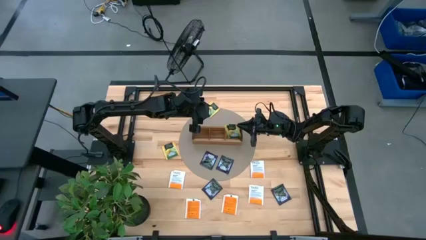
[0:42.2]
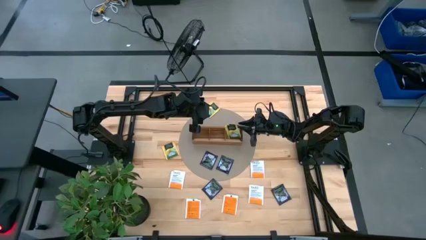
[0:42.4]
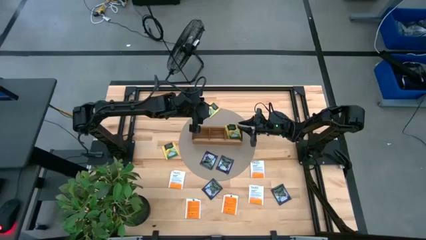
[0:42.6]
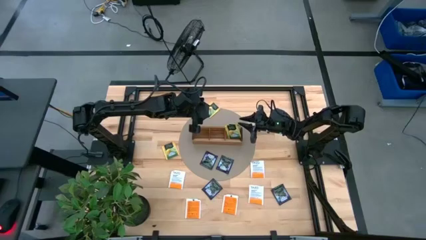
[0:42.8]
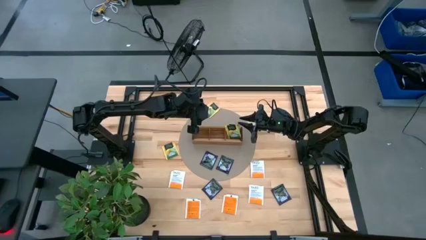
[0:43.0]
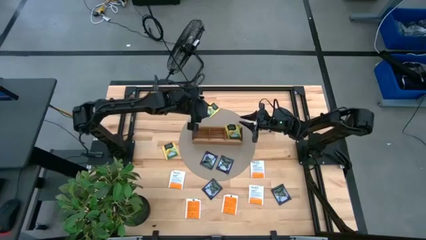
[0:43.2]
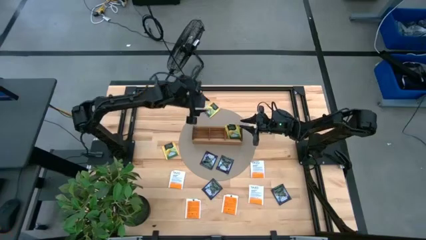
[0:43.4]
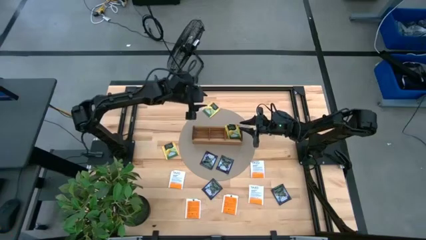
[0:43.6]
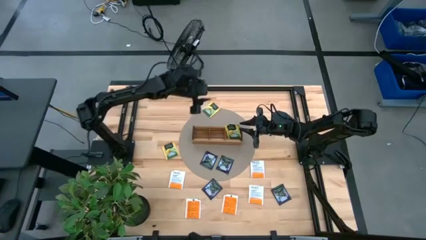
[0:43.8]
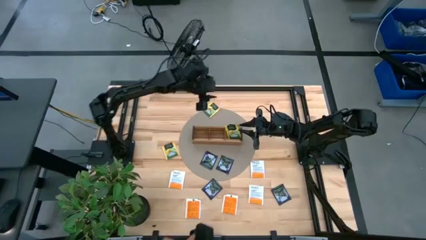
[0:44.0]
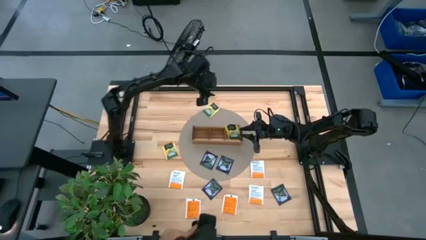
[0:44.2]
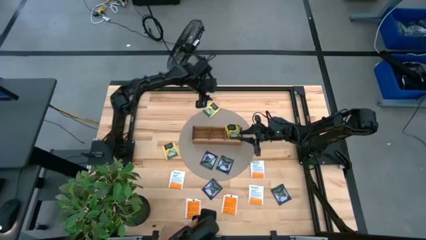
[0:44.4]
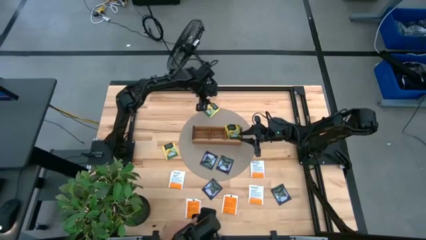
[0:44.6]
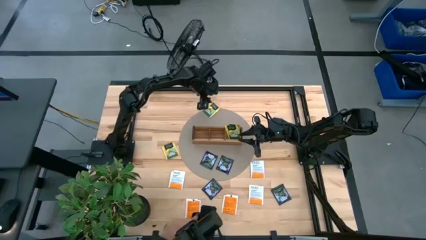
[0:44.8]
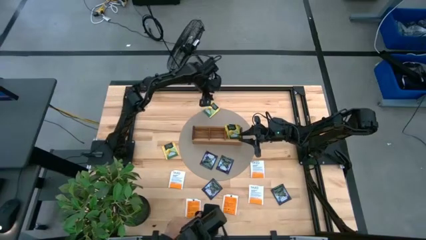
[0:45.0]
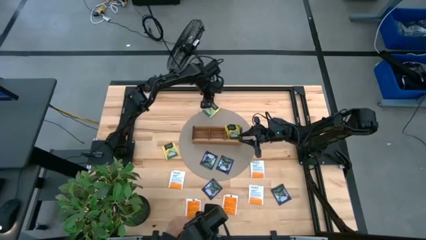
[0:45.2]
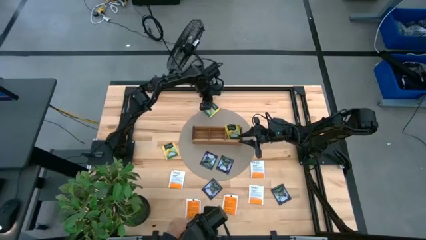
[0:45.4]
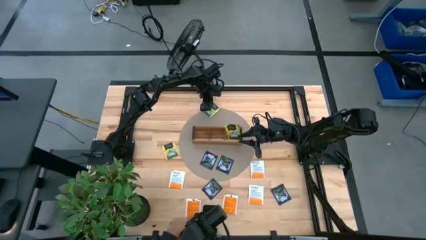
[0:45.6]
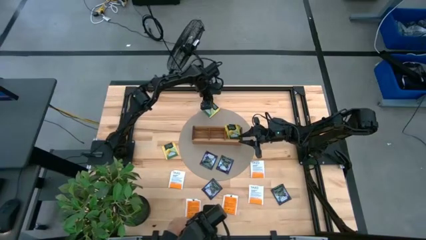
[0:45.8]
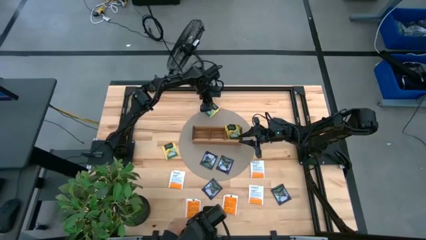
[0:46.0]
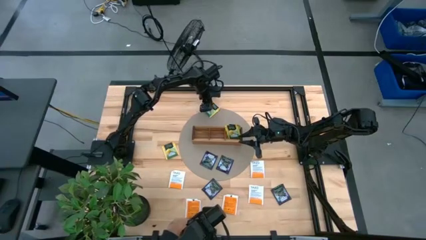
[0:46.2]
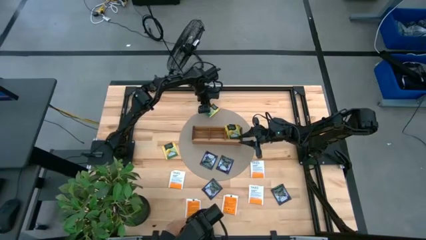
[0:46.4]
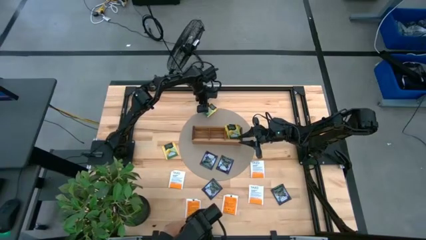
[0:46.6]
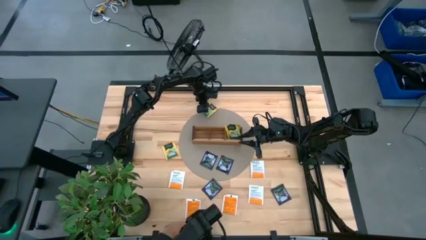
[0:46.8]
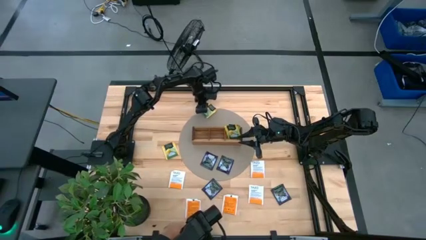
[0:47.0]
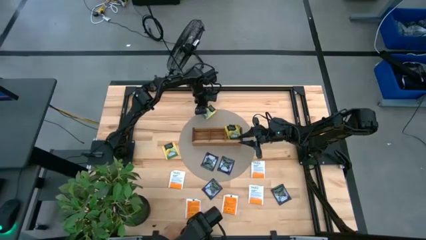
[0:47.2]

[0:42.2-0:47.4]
Task: Pick & Place Tea
Put the yellow tea bag into the right section of the wooden organizer

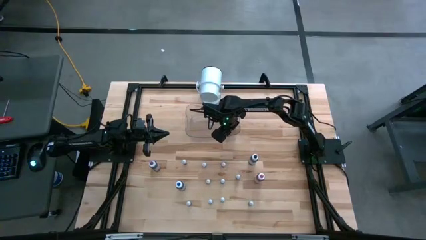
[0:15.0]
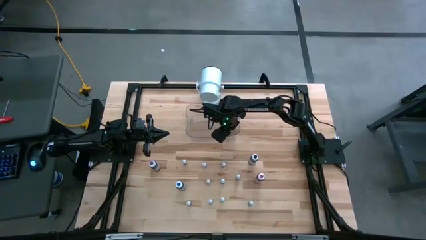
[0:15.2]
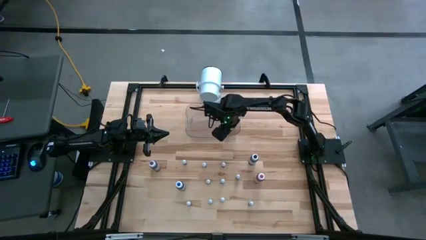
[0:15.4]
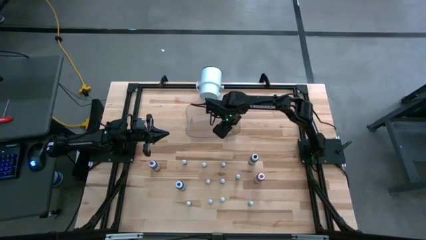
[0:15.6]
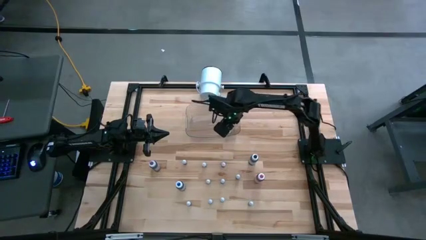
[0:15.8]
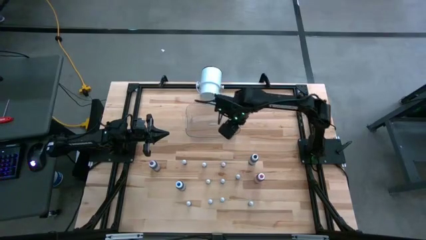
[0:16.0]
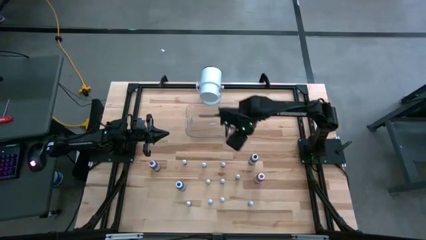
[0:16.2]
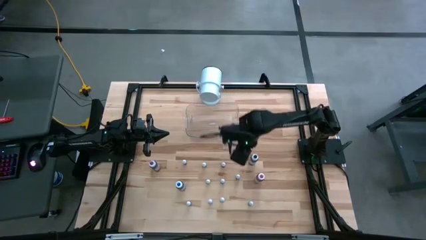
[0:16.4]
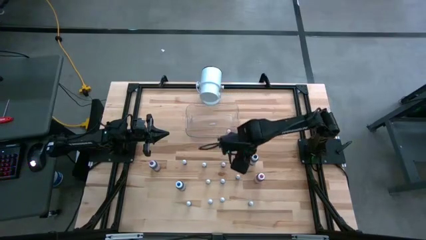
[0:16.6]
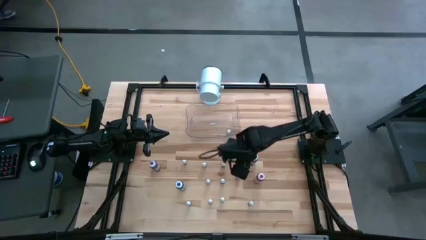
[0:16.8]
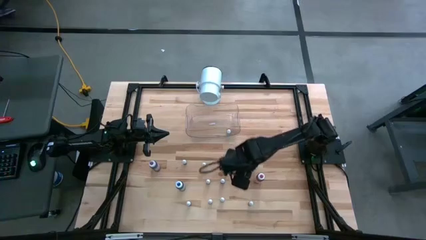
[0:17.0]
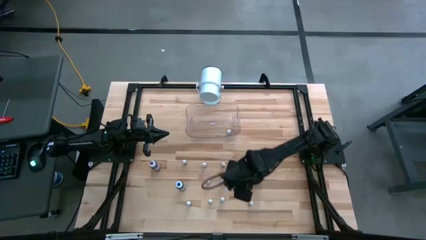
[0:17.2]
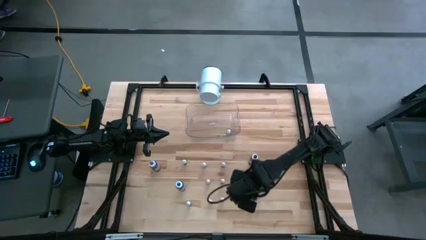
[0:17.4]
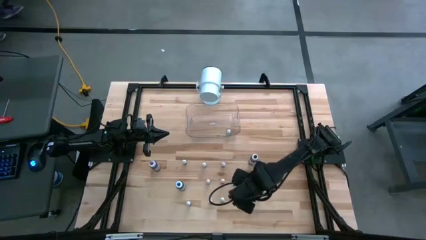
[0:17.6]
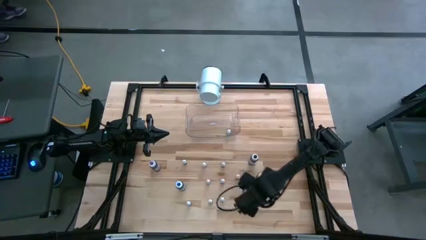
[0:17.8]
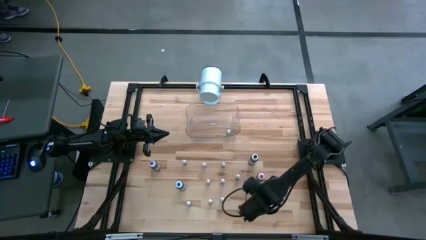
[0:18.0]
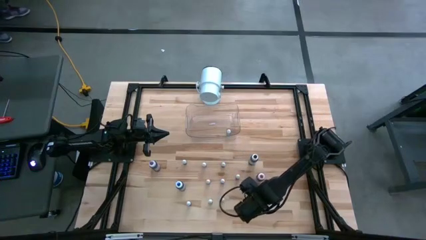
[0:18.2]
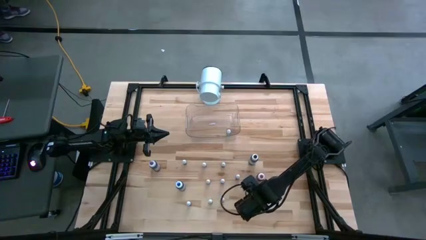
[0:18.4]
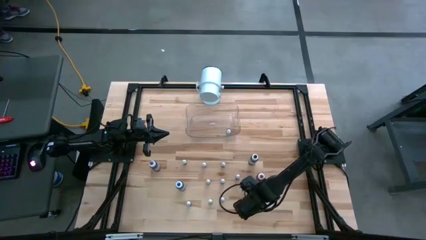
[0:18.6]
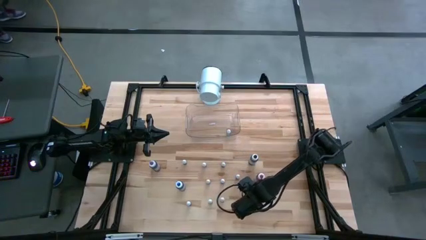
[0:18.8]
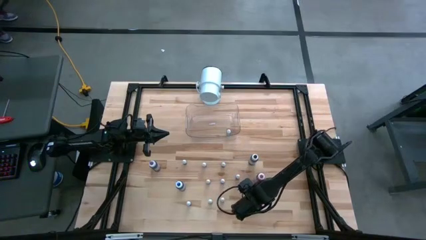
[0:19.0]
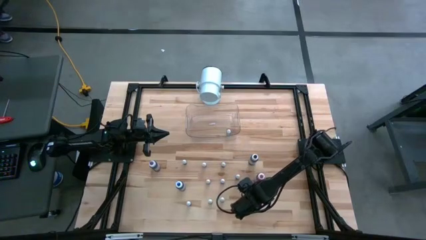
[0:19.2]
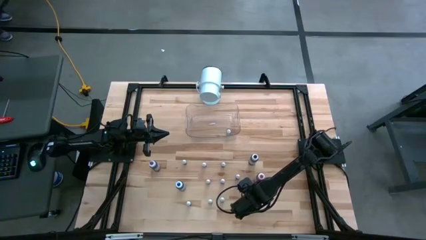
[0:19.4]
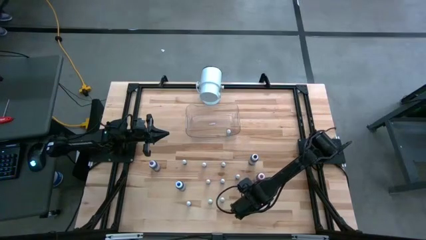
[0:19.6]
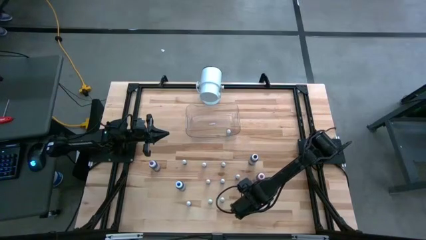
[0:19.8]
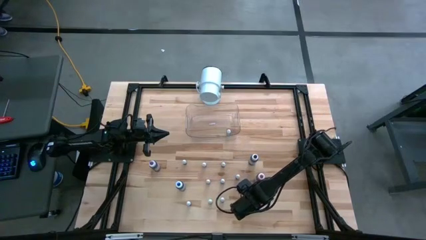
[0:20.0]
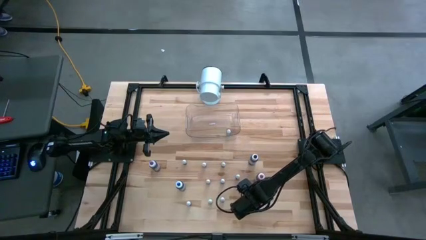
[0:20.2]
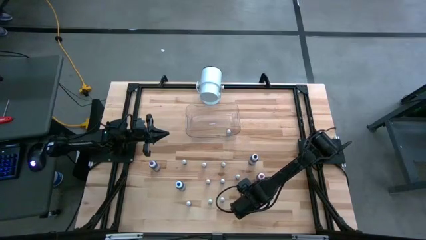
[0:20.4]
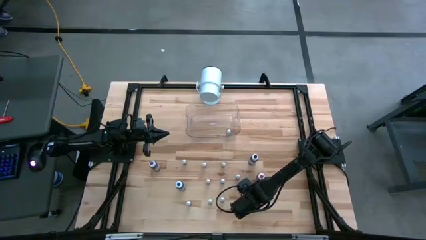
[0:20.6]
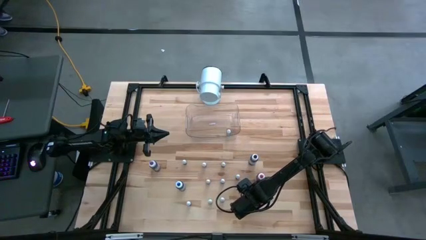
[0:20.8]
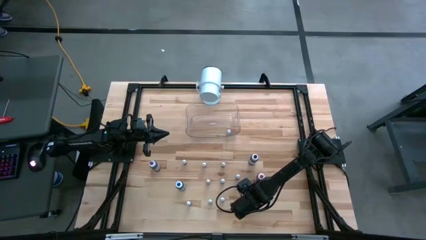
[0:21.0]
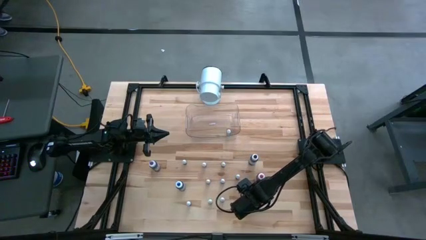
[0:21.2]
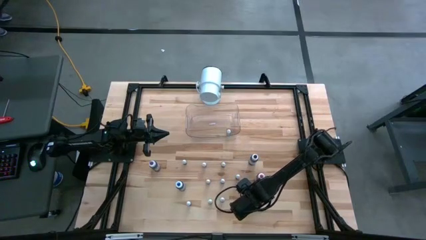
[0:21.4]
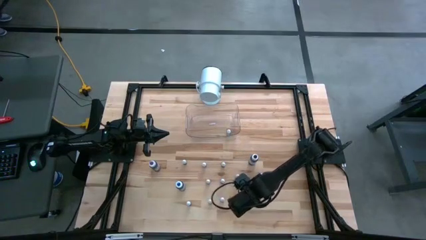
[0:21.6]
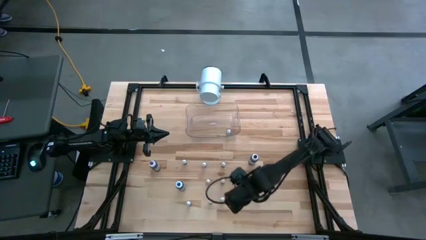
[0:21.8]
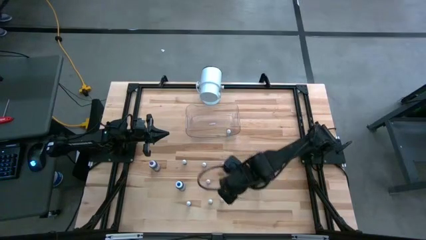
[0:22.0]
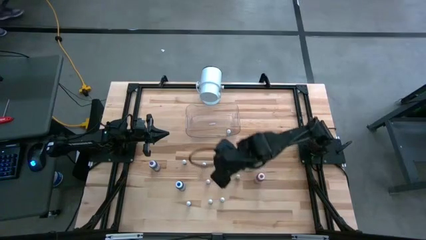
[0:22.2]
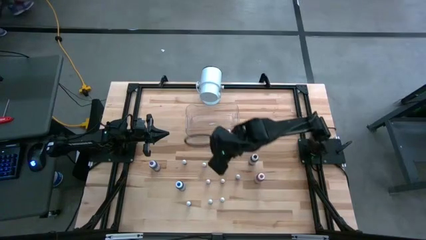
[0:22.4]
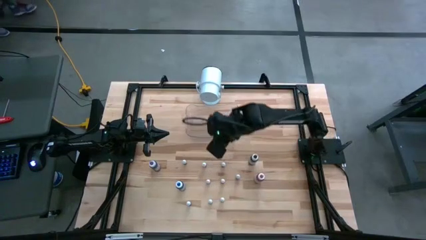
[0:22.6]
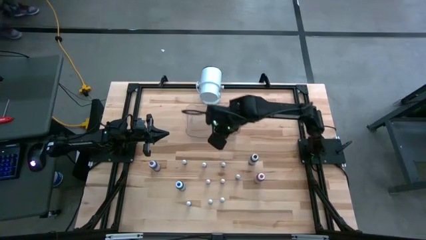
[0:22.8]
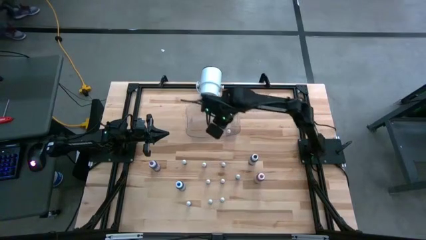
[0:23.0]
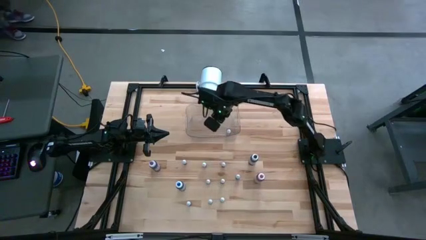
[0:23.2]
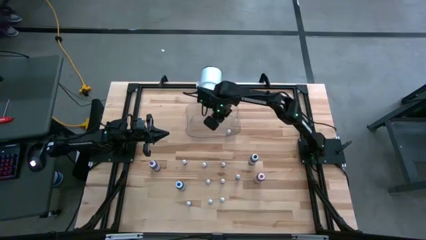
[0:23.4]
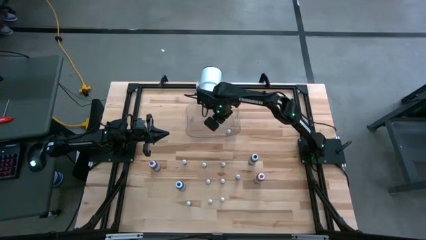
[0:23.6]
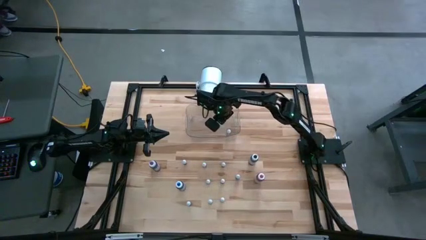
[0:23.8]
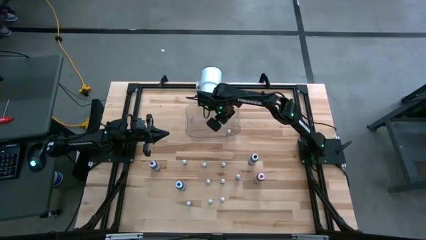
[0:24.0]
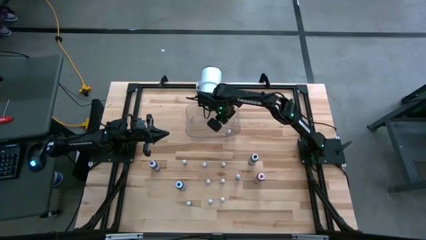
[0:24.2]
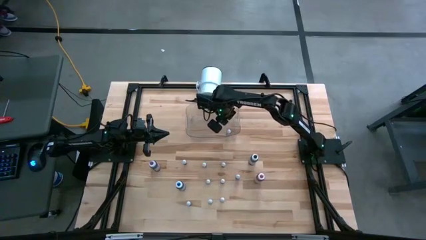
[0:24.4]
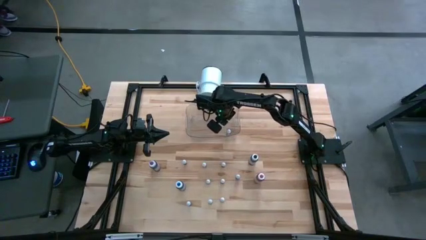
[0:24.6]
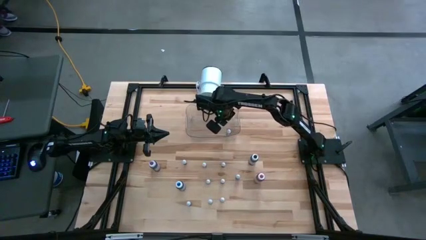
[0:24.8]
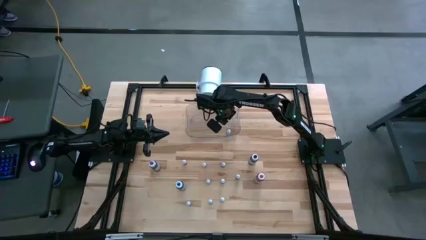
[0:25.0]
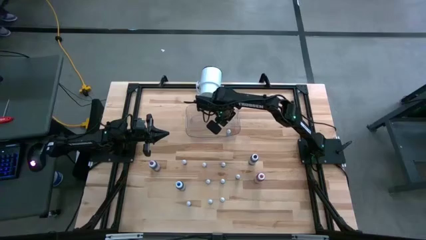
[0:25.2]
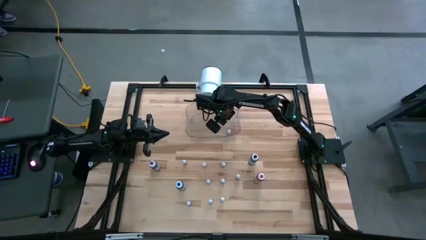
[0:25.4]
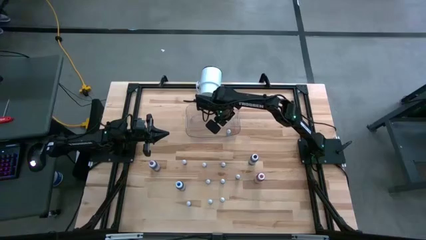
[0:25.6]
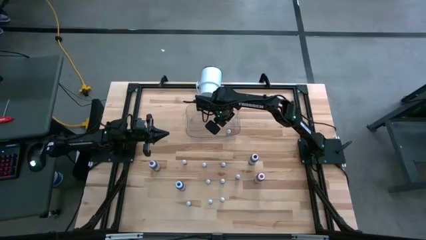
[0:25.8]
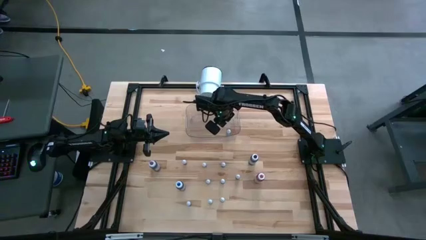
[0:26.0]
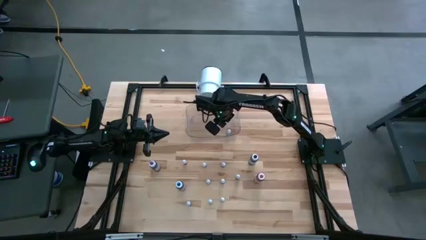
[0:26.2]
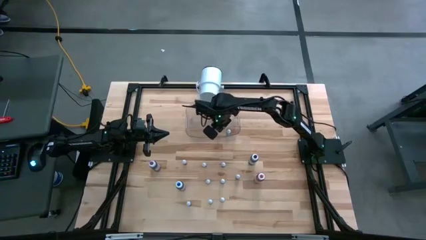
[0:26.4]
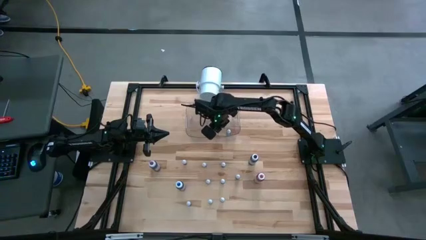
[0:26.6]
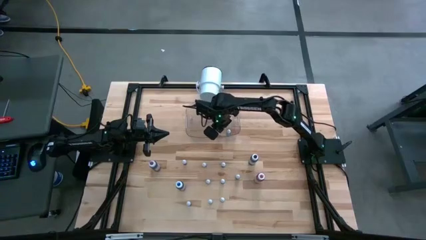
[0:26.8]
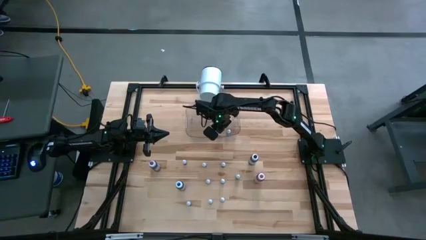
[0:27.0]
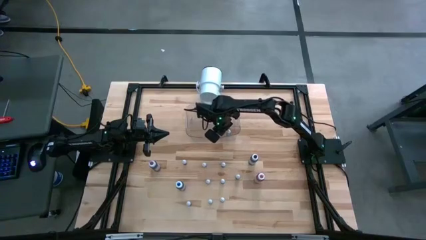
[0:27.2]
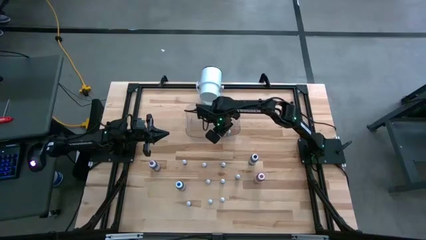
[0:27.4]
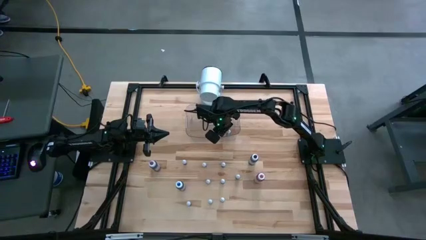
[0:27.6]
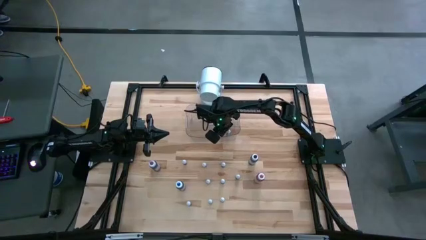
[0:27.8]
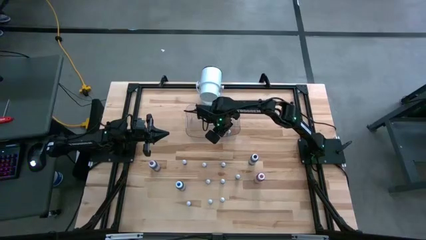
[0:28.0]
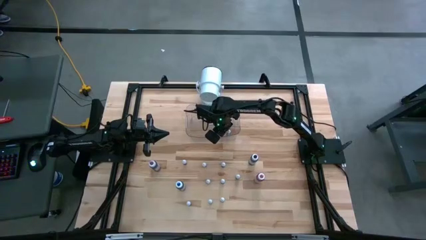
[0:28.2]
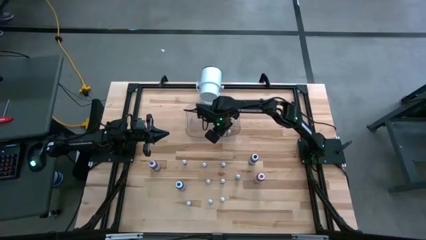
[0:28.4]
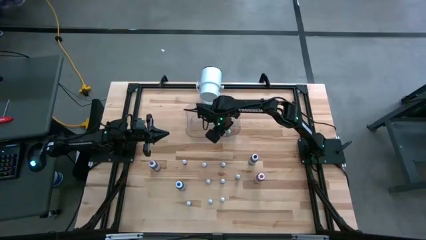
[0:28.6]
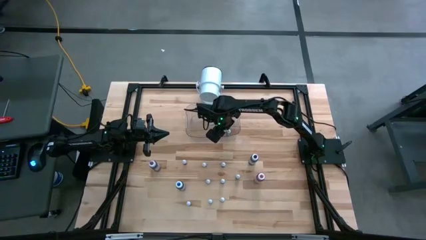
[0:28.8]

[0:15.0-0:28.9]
Task: Pick & Place food coloring
Put the bottom small red food coloring bottle into the transparent bin
